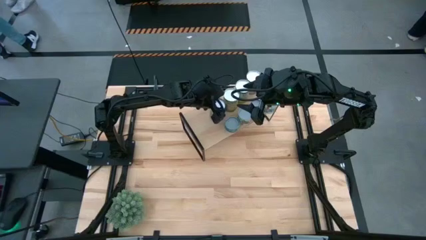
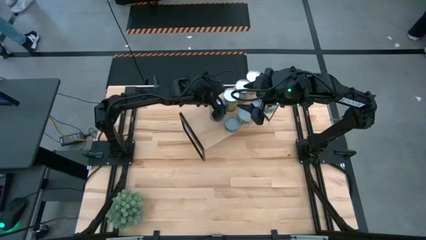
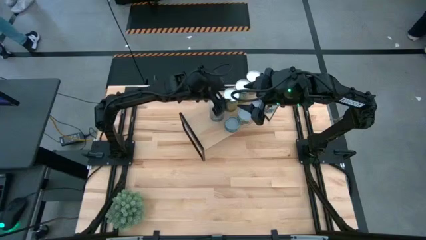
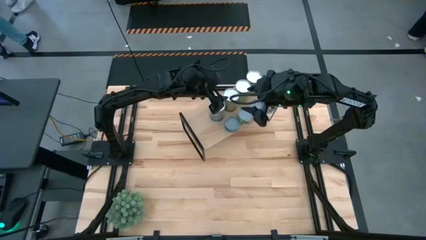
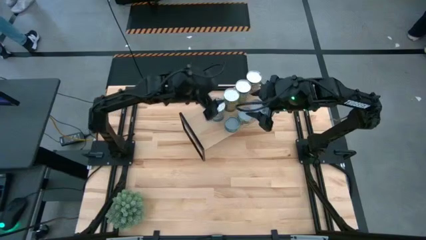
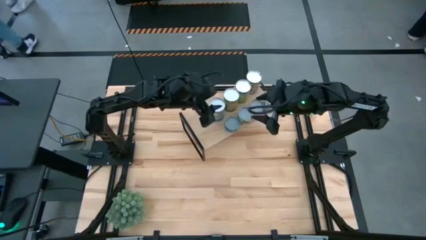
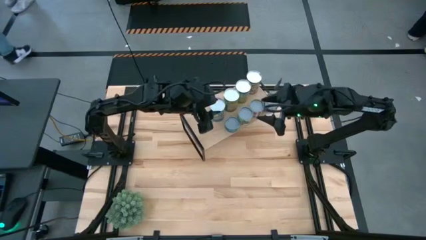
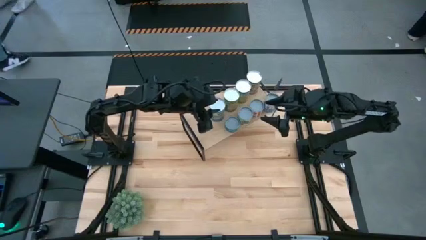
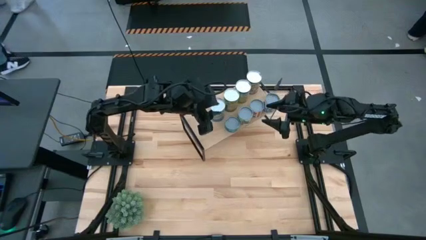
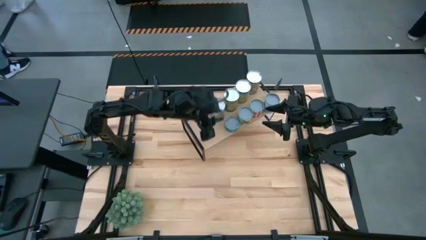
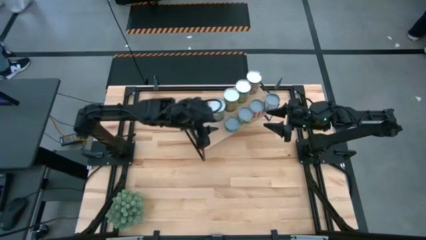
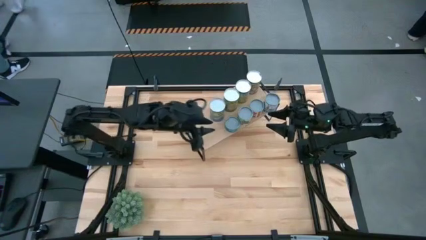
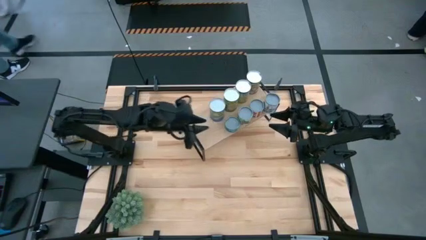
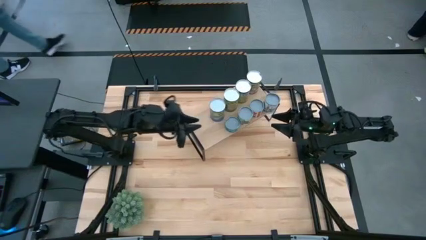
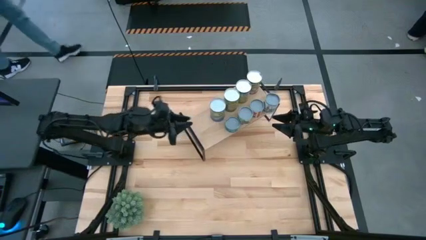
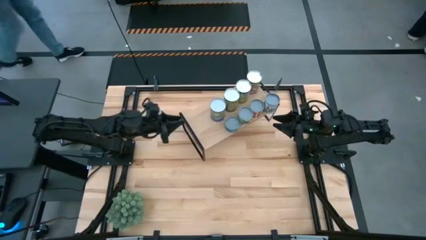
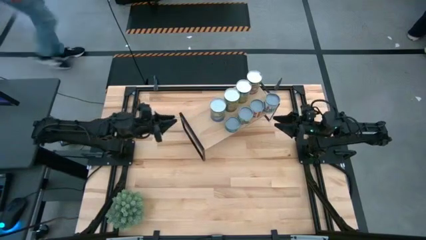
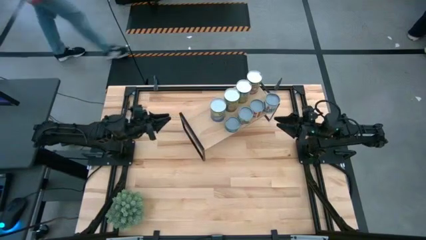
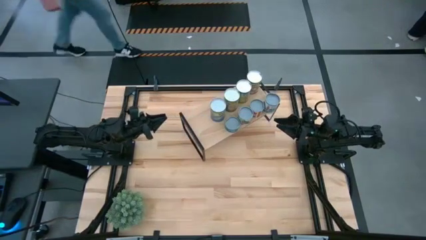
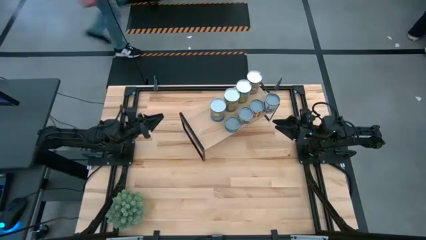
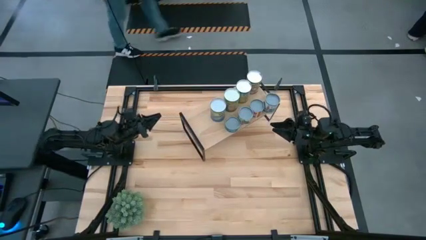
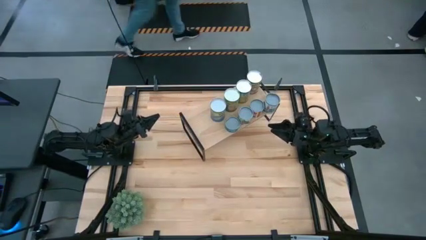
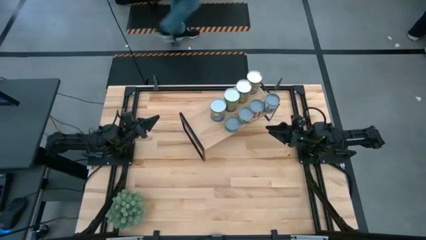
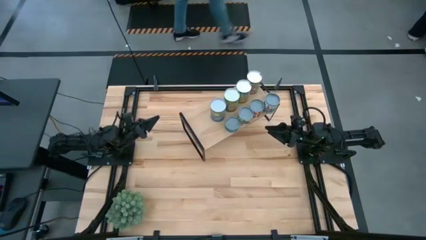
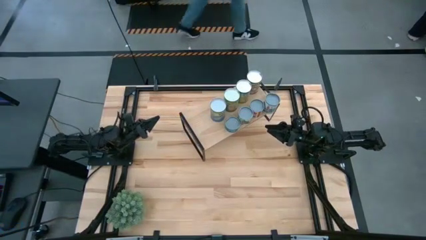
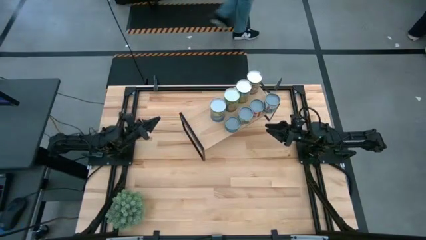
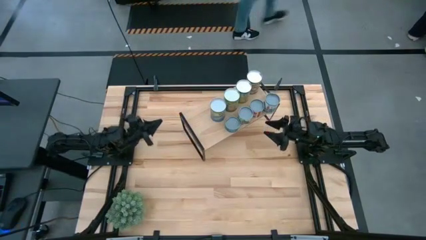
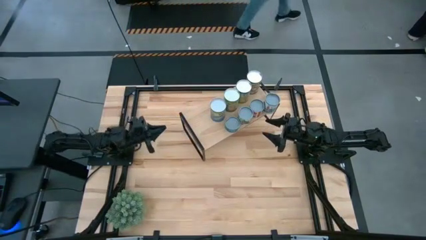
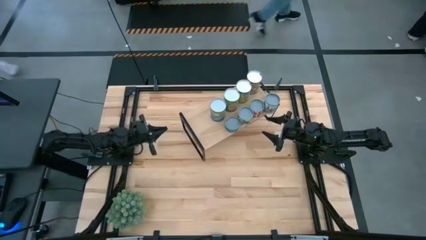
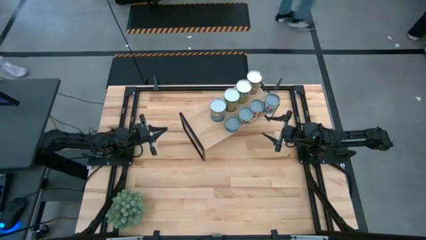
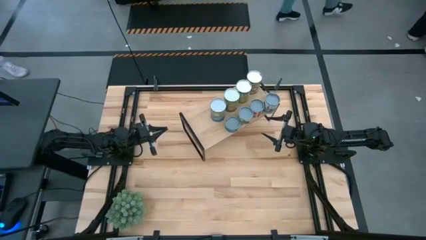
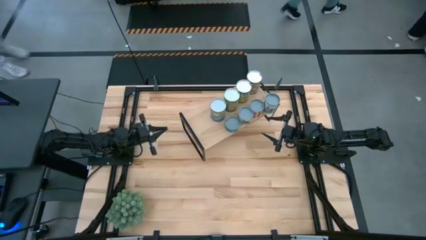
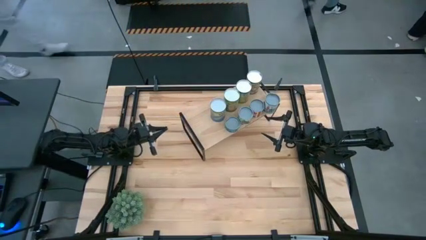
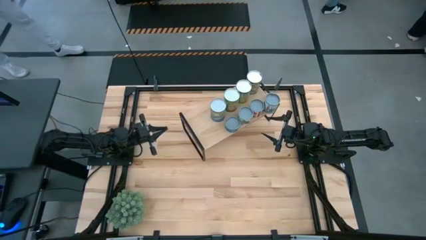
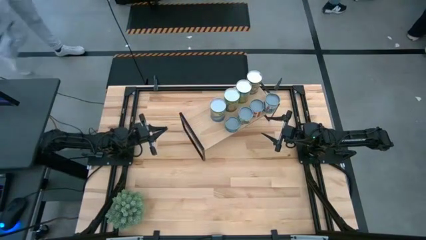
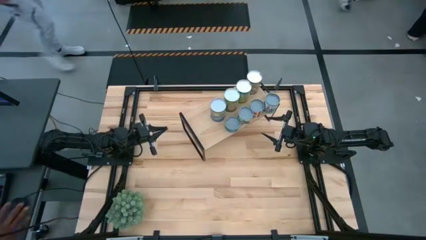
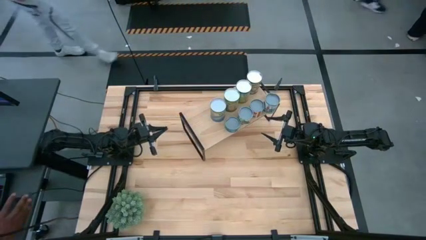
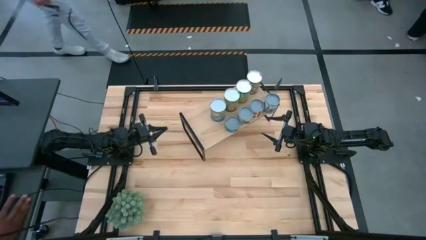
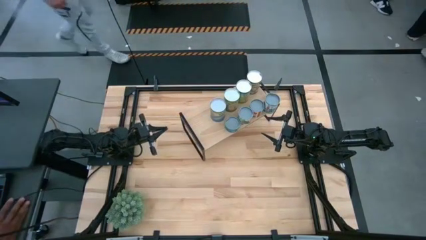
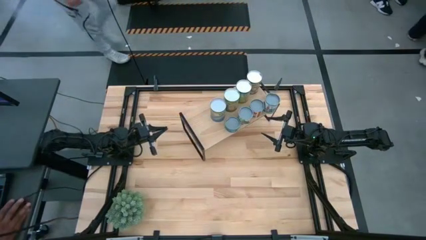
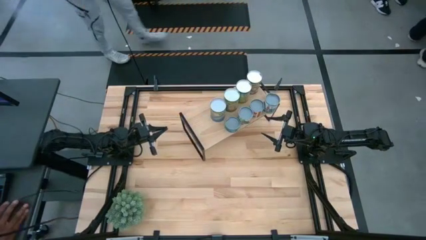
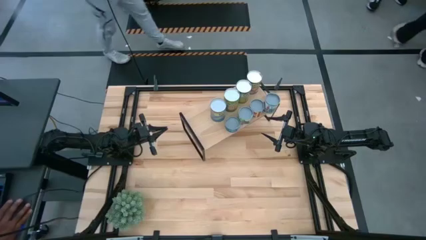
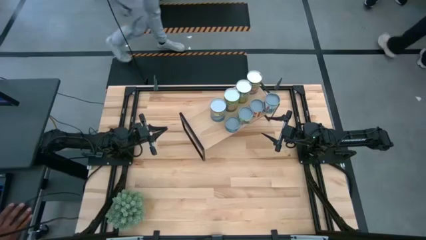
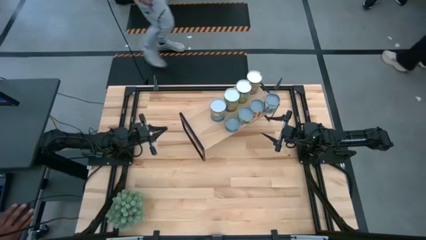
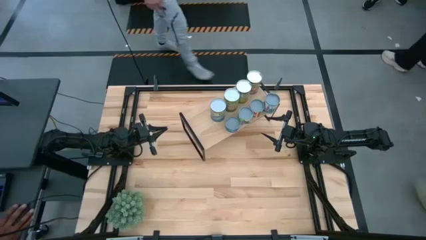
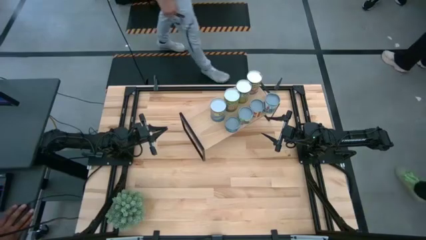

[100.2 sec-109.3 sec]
Task: Pick and place cans onto a shelf
Return to Home Position

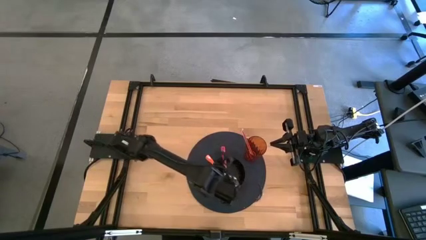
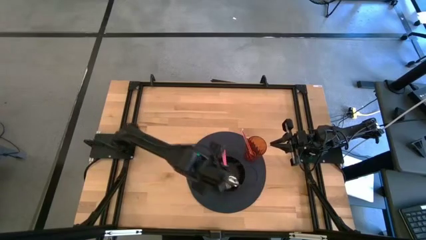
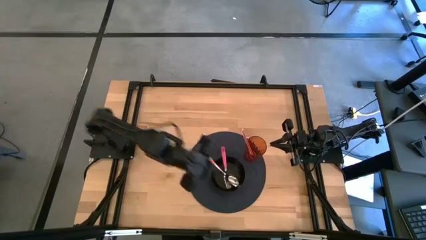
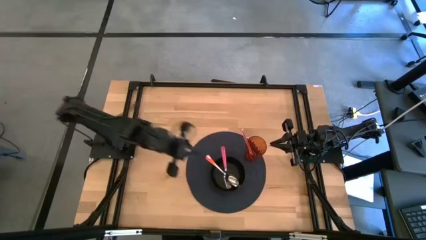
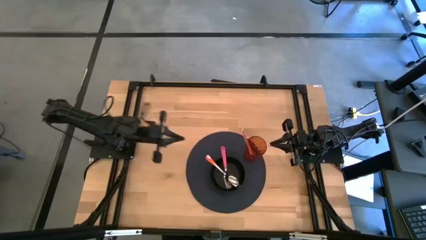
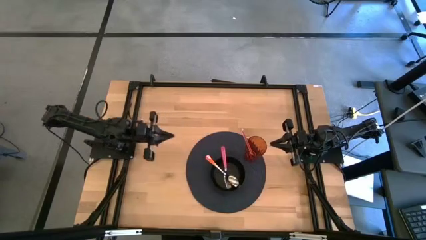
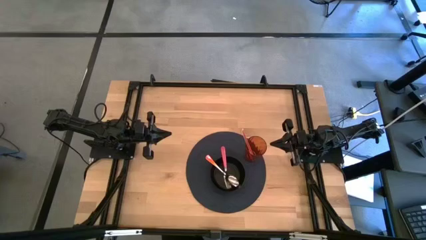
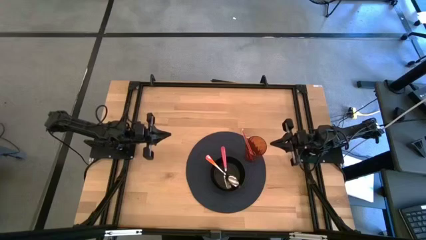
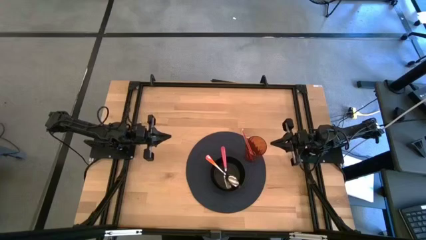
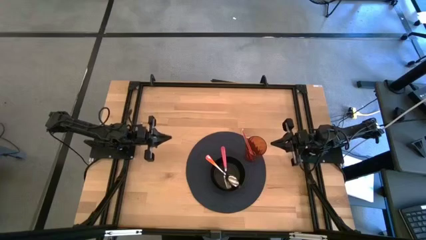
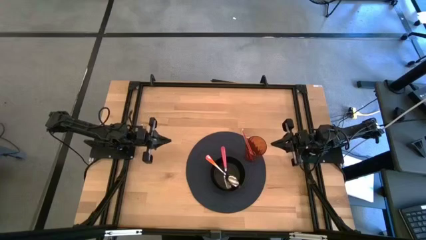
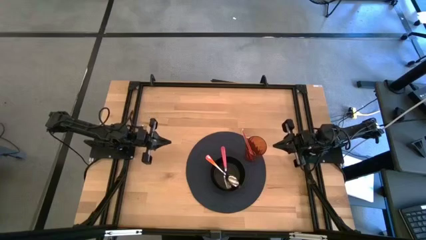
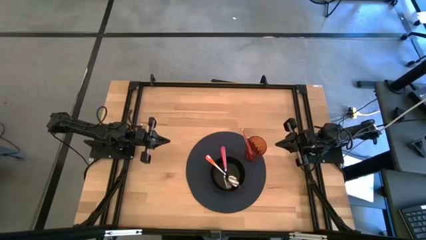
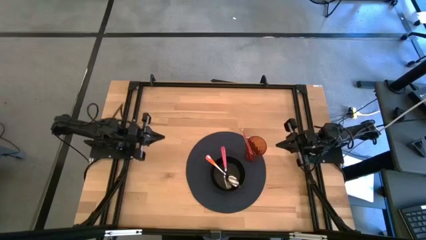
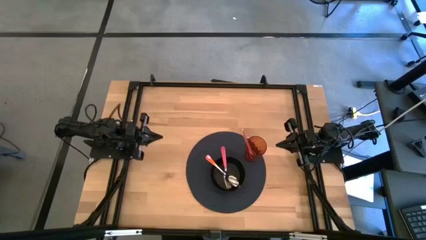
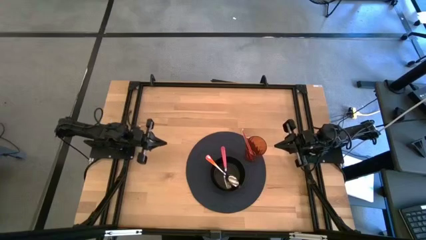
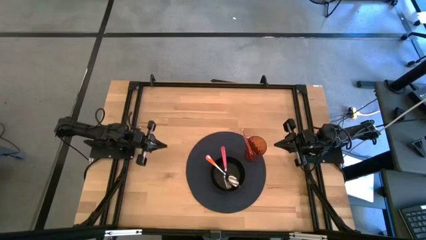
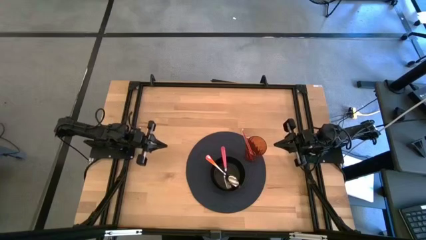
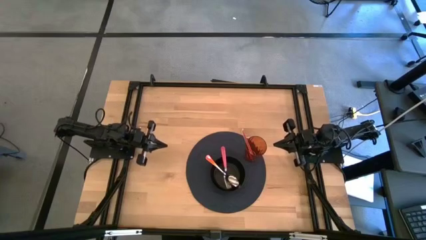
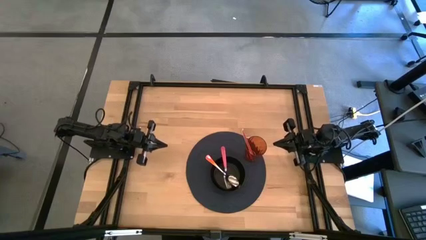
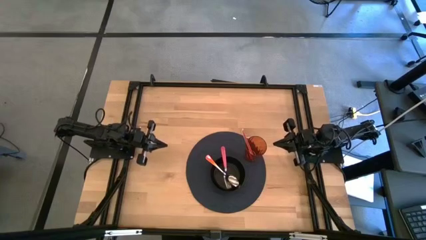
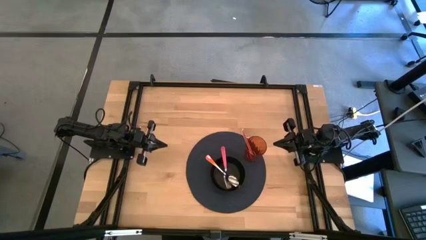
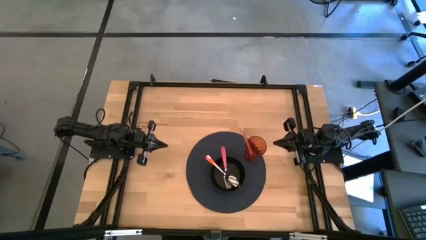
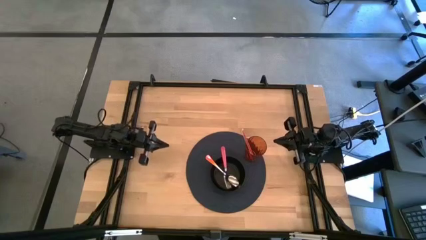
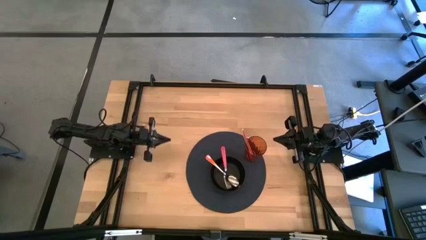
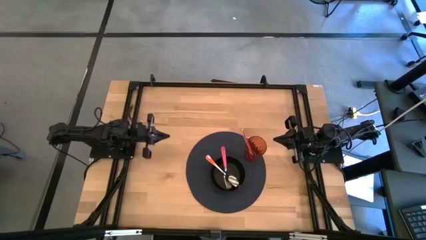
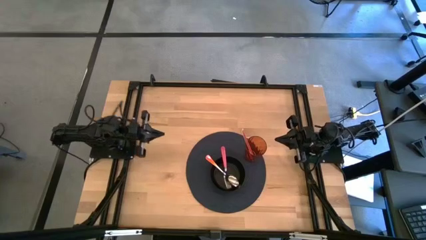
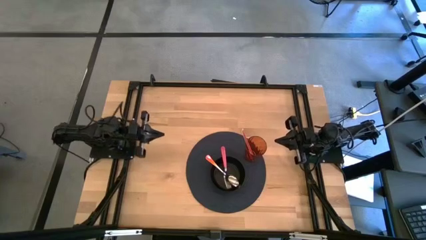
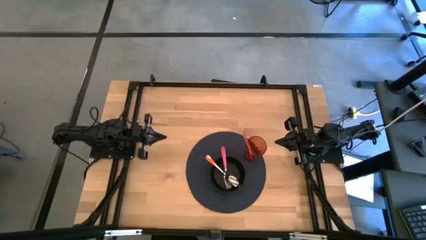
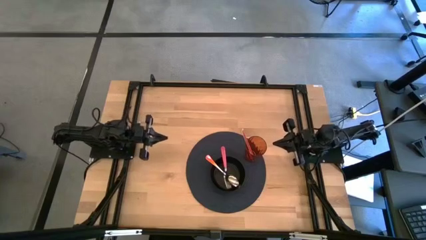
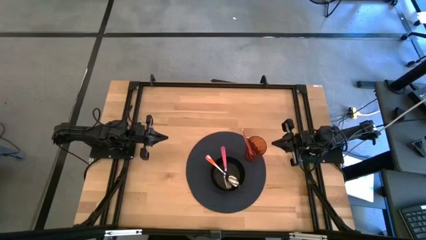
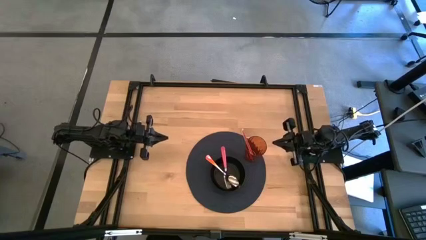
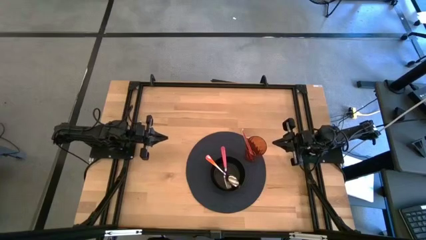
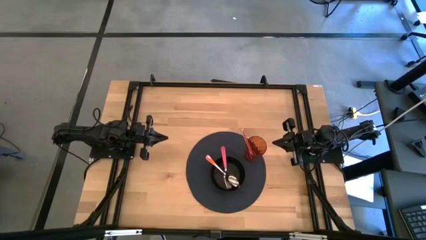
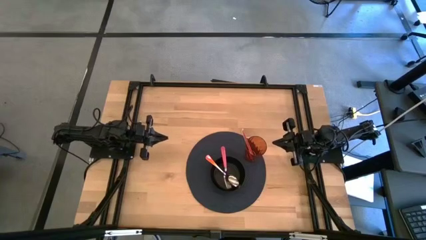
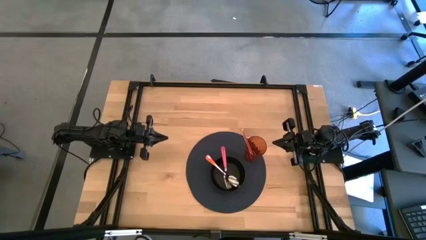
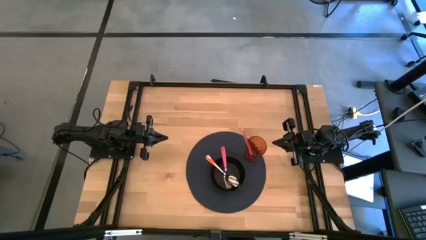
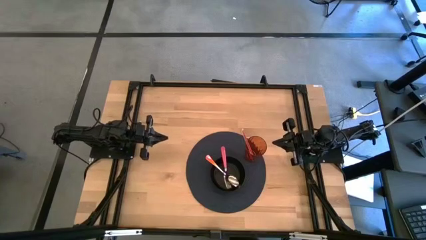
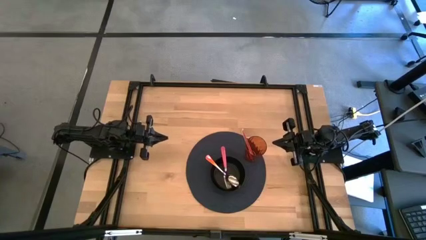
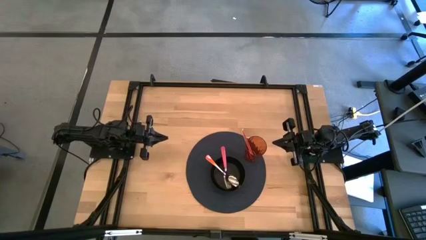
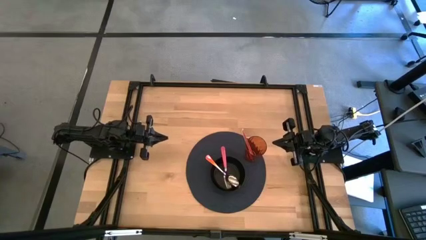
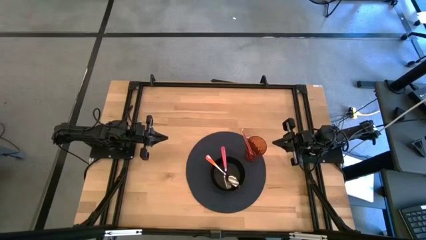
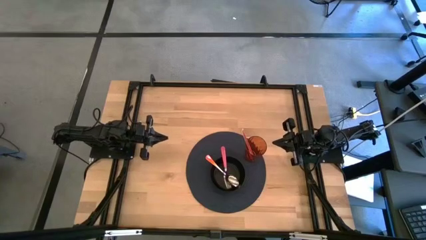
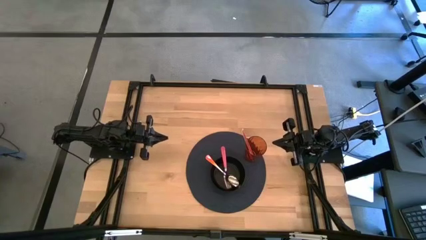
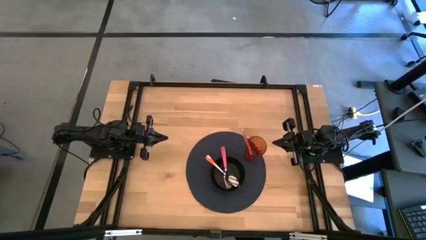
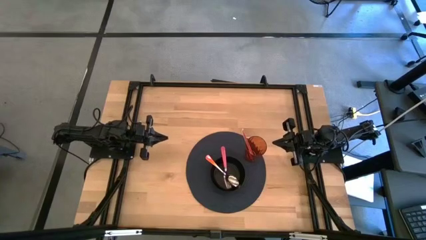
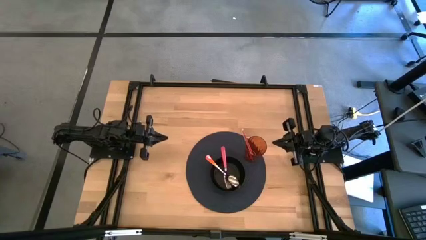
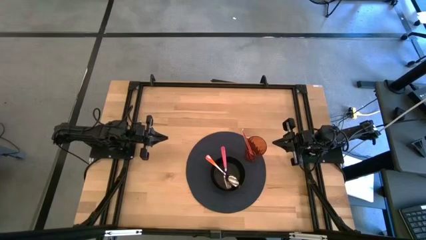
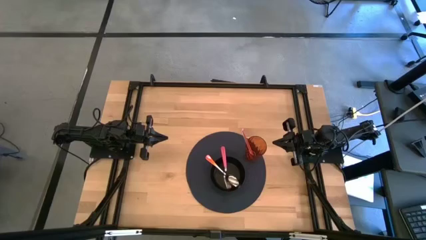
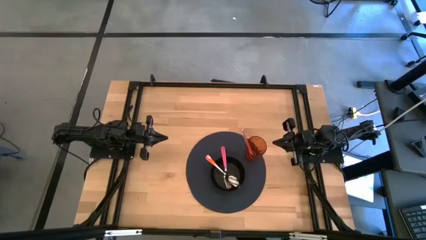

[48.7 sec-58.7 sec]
Task: Pick & Place Utensil
Return to Home Position
